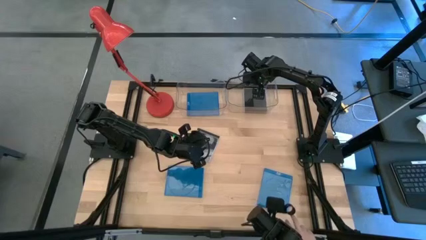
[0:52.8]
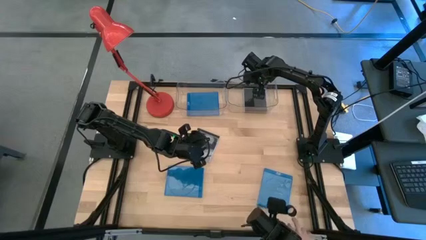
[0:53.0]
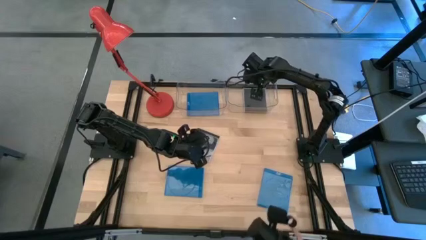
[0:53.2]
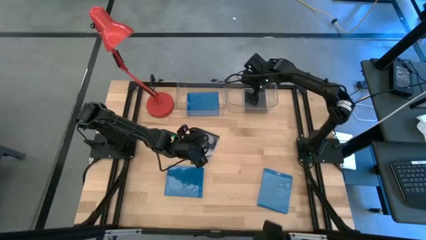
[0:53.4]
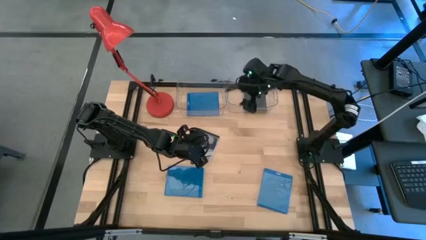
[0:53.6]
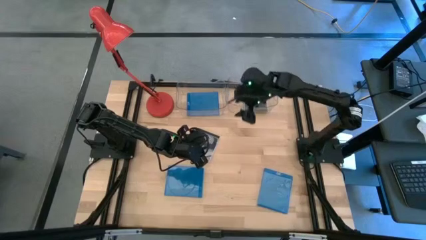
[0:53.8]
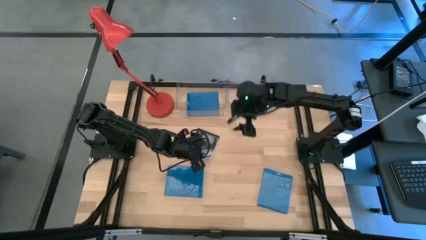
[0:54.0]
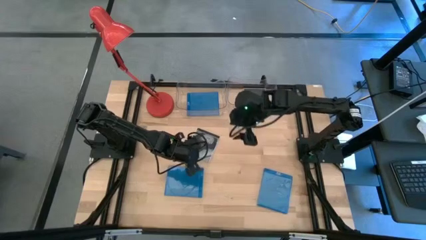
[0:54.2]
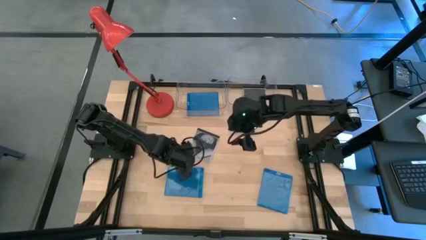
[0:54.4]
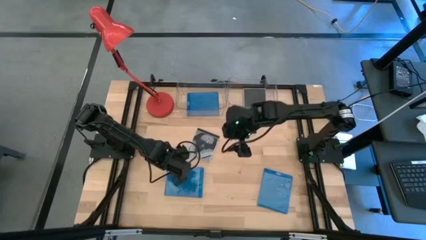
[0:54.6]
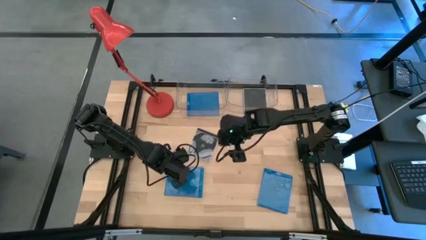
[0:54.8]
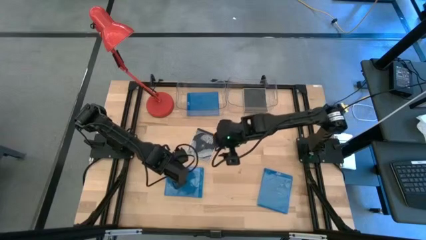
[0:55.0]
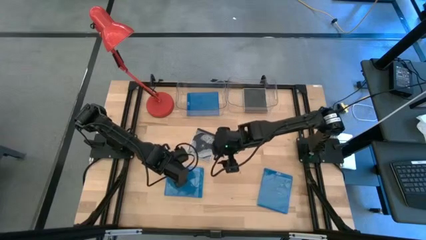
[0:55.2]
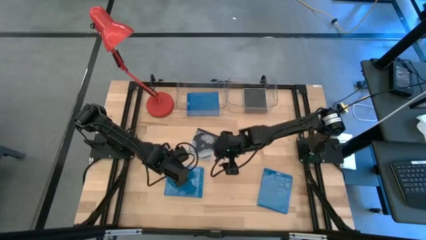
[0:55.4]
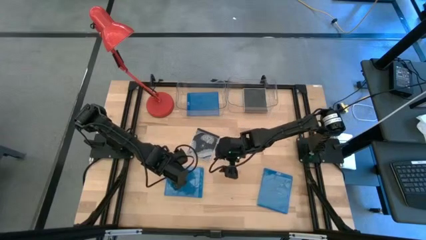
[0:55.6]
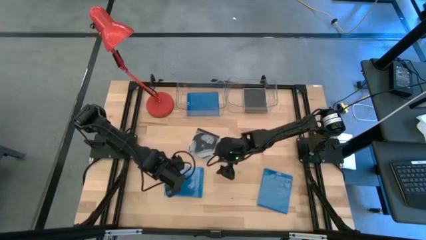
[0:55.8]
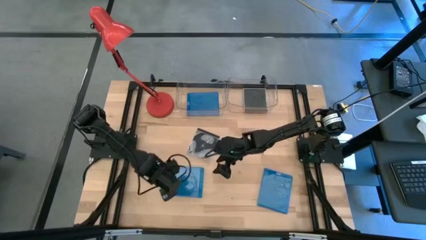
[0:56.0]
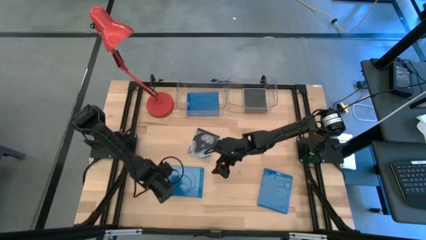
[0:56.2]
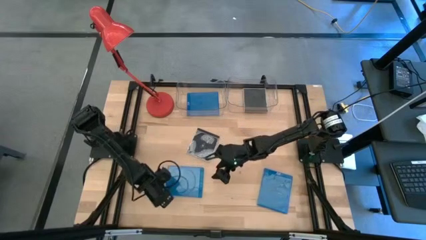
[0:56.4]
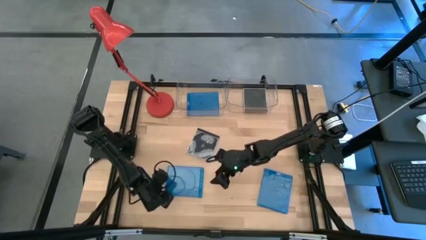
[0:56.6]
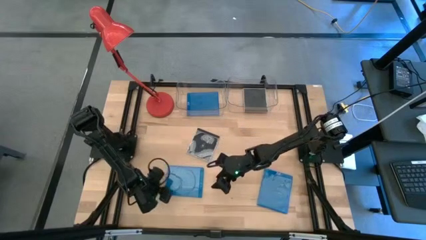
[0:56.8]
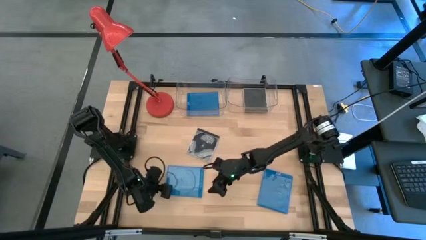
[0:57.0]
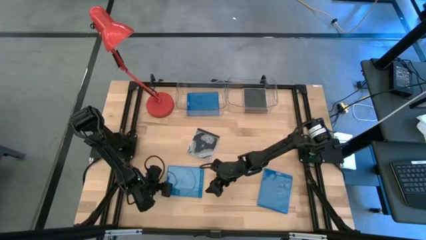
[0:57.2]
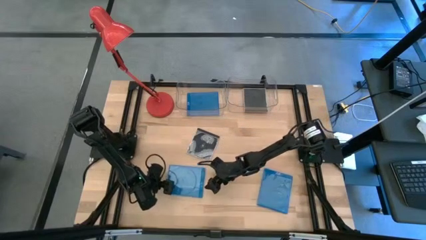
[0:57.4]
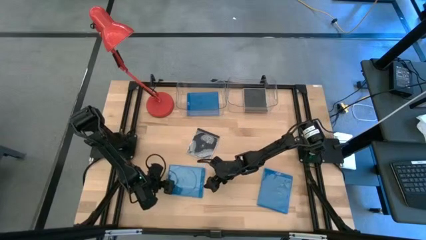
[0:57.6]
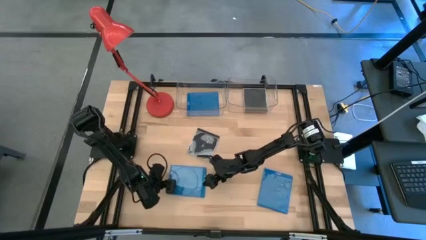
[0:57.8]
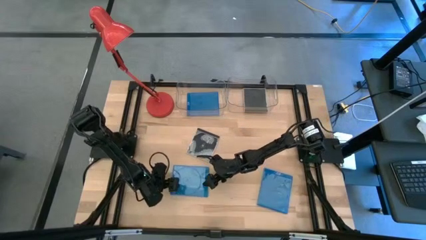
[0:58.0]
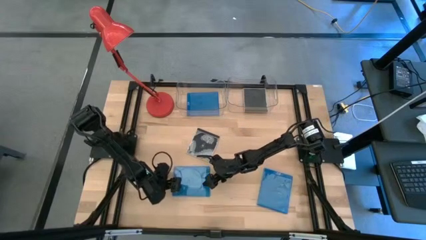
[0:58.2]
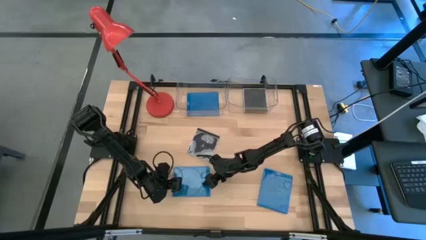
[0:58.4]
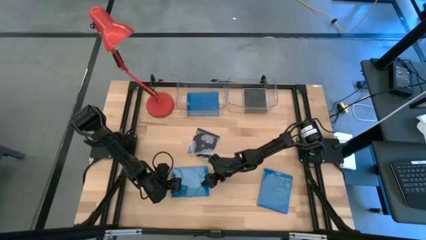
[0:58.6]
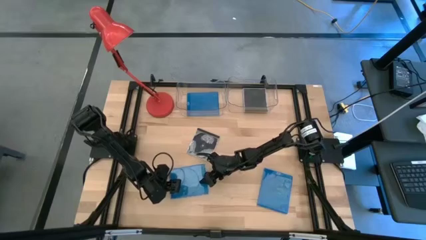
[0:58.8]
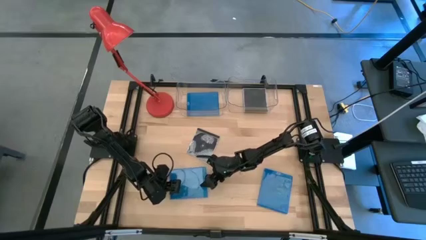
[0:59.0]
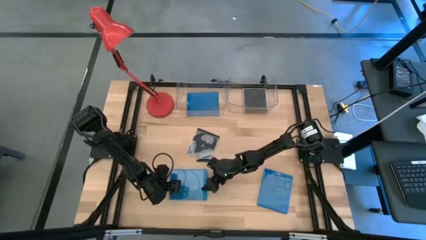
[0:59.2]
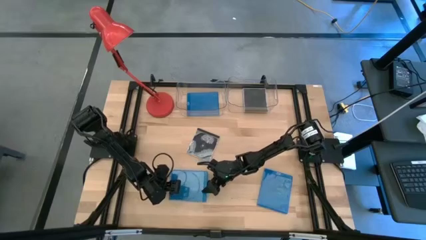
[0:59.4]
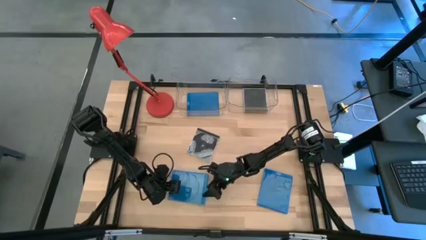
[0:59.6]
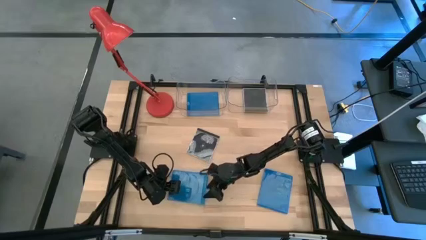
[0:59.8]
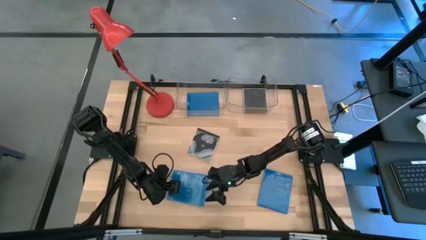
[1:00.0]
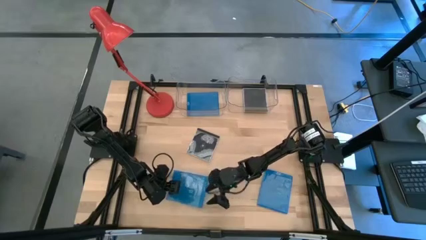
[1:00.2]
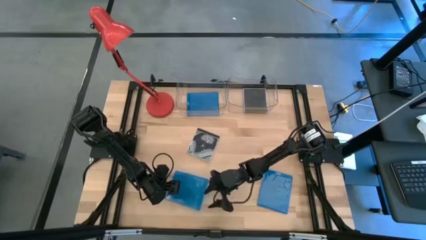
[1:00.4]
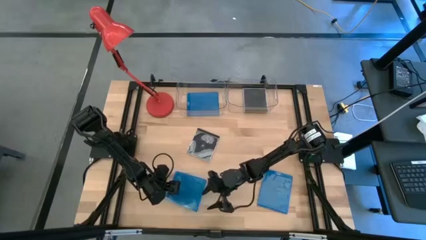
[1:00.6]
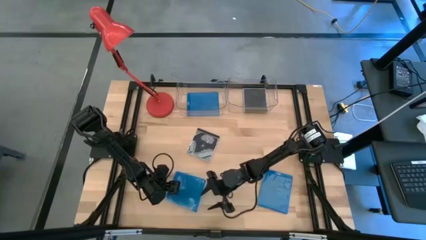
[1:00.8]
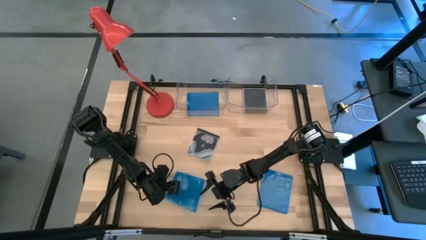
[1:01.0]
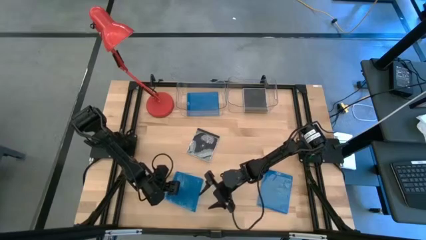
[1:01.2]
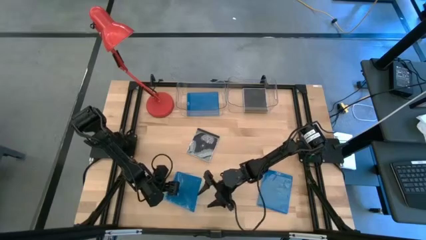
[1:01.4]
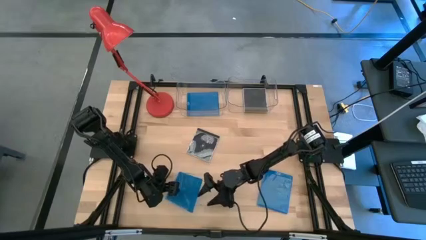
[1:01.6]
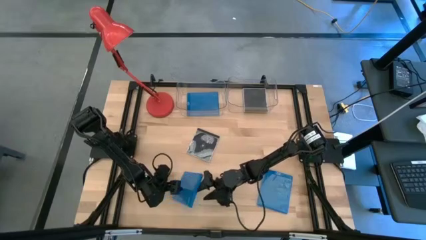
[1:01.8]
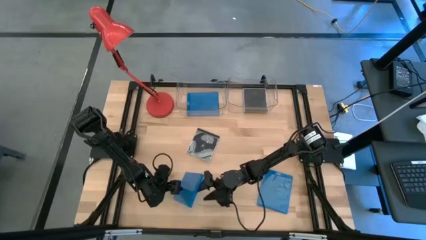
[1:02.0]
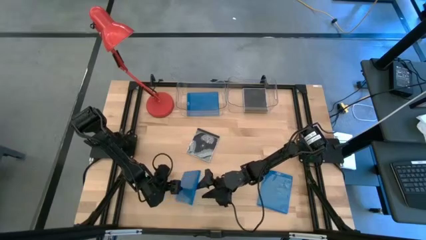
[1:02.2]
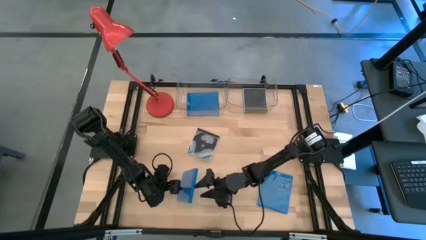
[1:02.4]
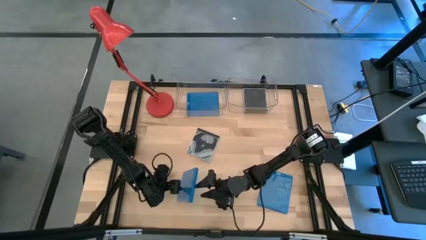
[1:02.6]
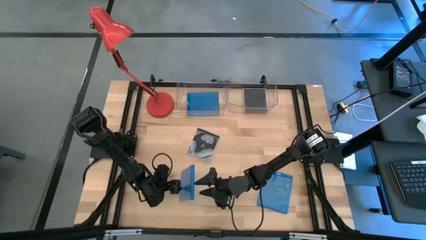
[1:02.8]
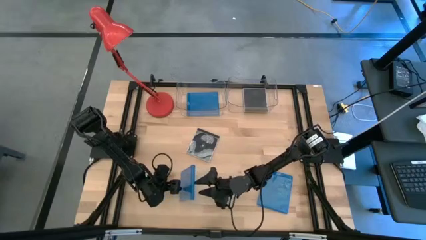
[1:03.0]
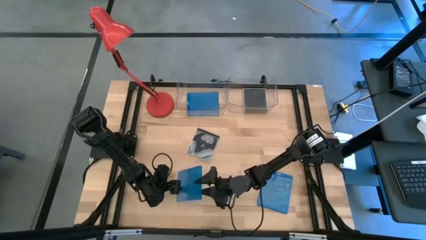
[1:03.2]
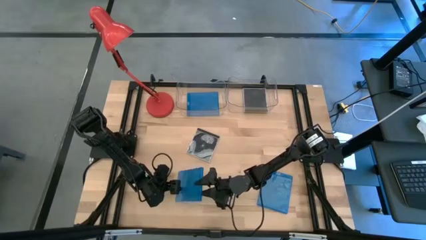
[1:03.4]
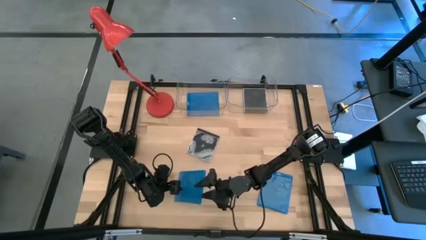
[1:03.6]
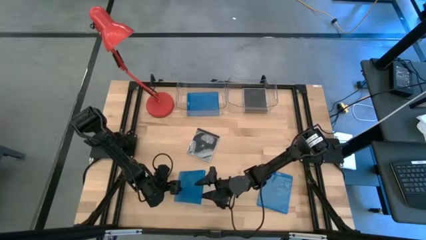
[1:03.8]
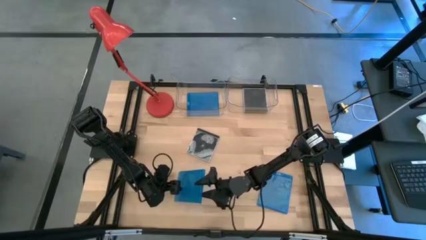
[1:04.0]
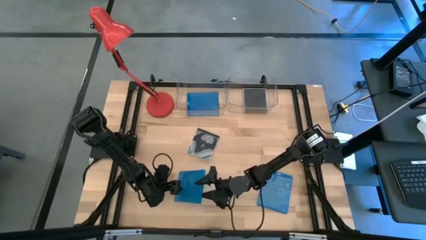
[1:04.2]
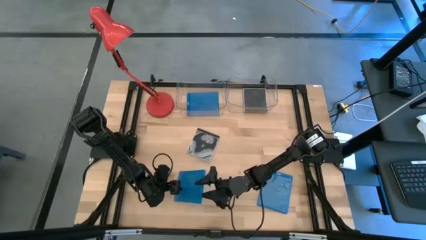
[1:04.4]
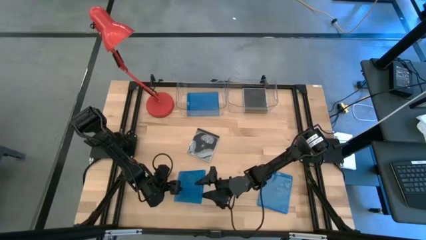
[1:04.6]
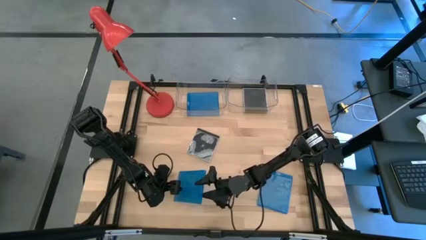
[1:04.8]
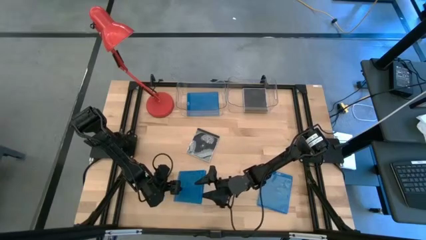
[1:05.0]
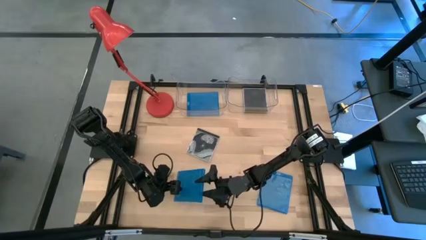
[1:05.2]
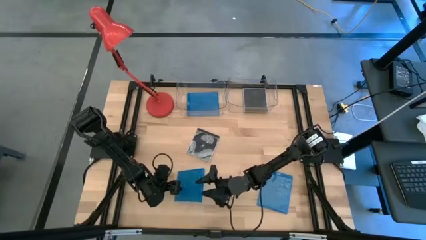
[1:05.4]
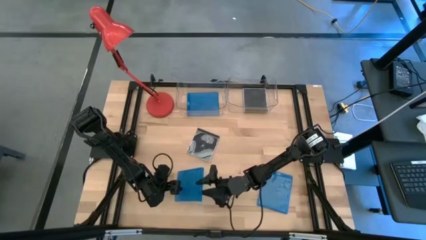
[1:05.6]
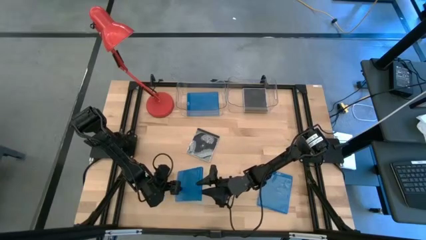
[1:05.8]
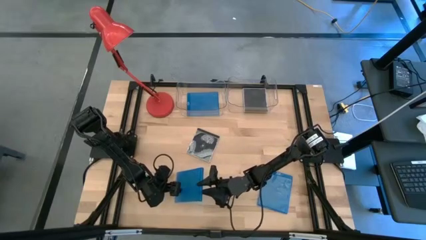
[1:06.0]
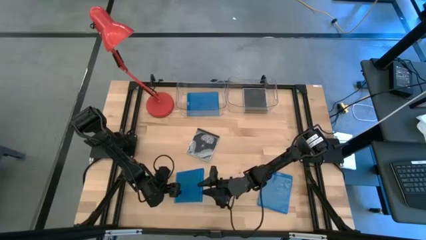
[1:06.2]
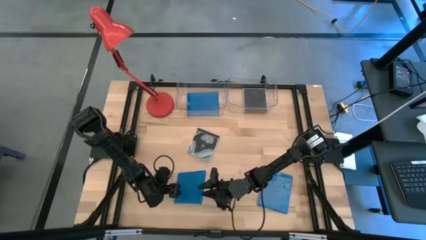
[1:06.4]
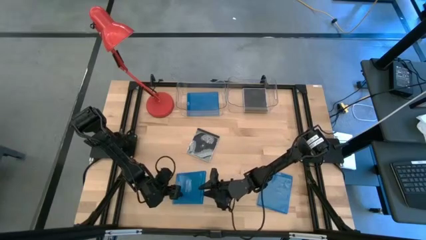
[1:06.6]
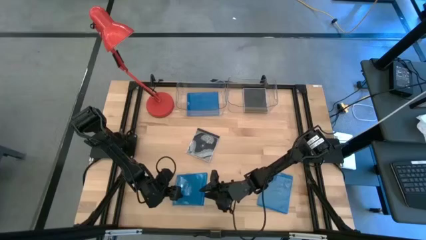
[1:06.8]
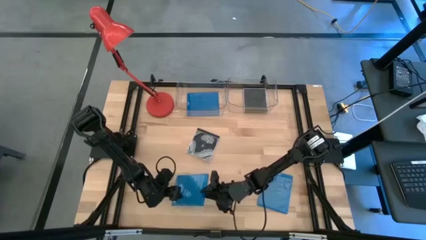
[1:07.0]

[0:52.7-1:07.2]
Task: Pick & place jewel cases by type
Put the left blue cd case into the left transparent bin

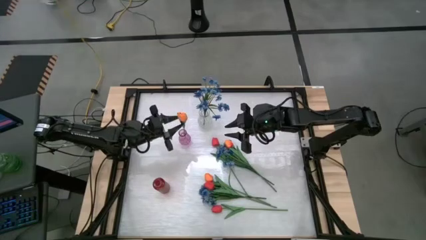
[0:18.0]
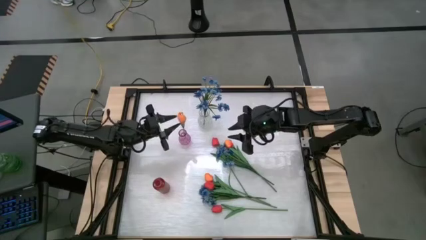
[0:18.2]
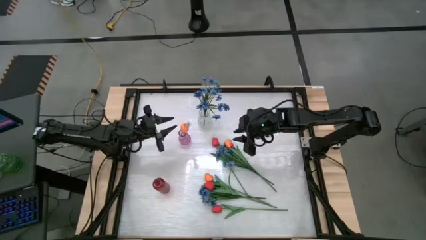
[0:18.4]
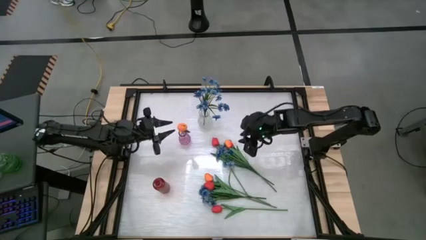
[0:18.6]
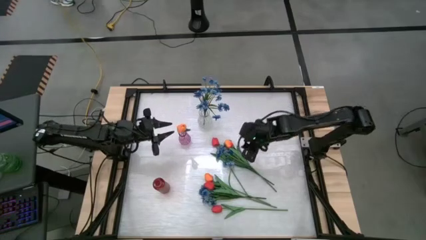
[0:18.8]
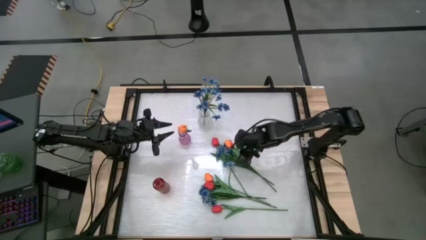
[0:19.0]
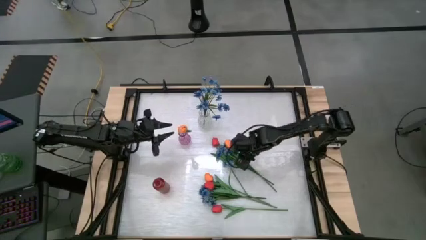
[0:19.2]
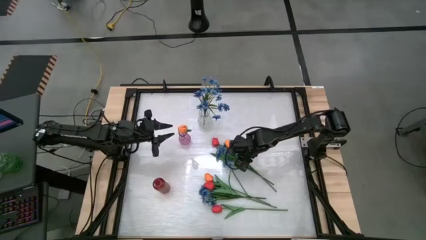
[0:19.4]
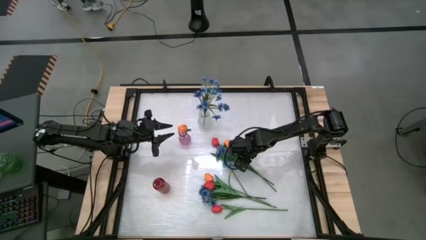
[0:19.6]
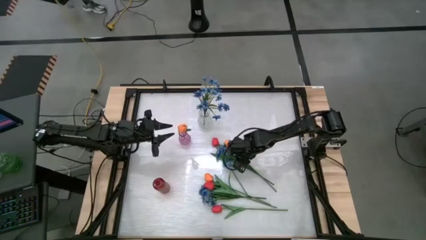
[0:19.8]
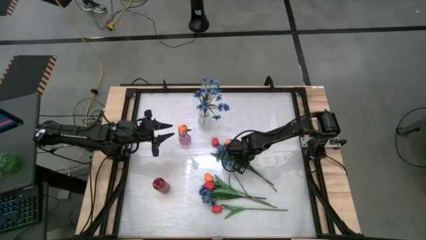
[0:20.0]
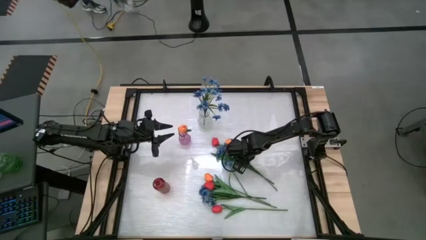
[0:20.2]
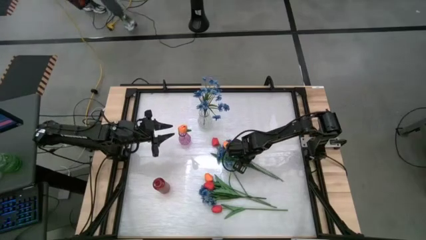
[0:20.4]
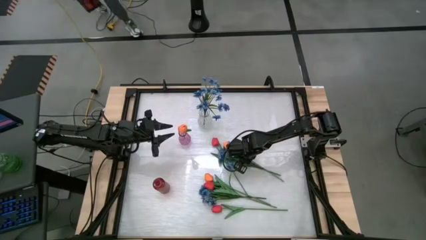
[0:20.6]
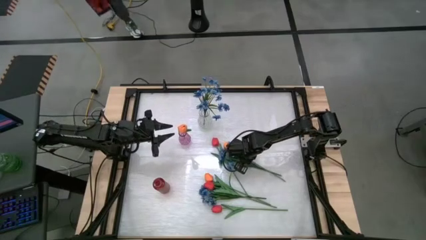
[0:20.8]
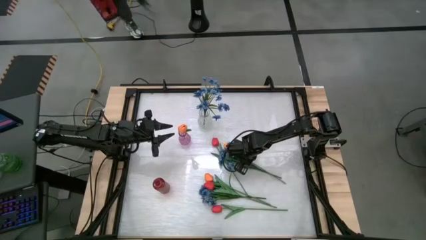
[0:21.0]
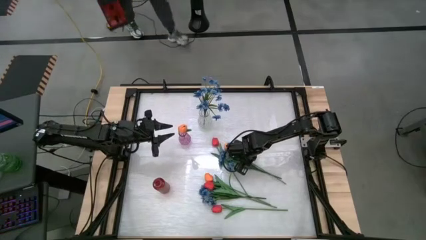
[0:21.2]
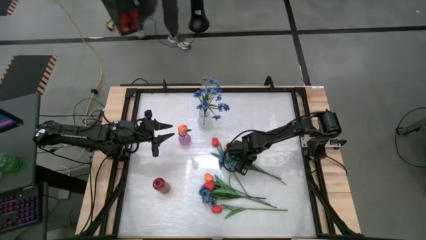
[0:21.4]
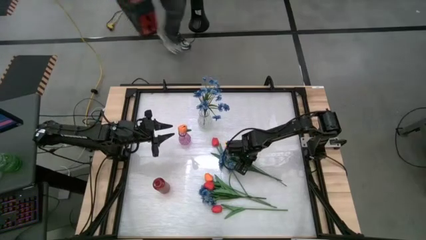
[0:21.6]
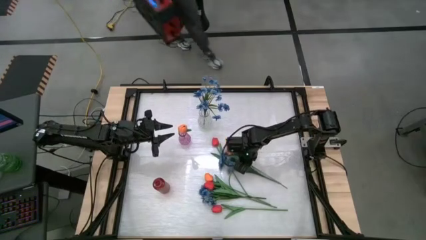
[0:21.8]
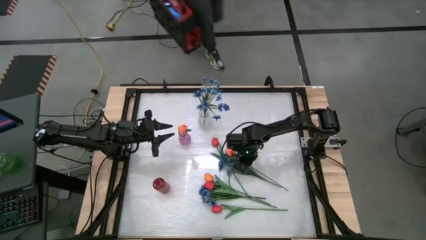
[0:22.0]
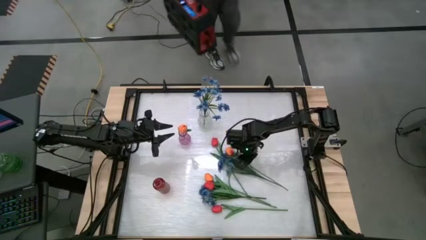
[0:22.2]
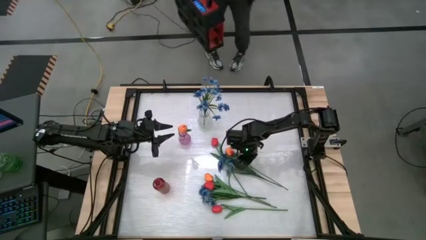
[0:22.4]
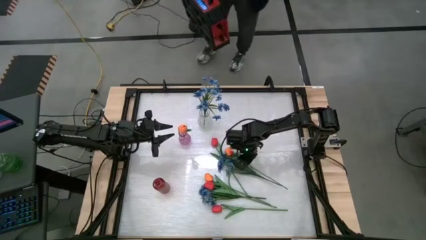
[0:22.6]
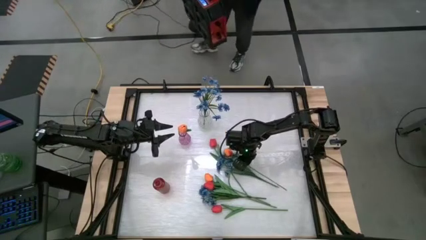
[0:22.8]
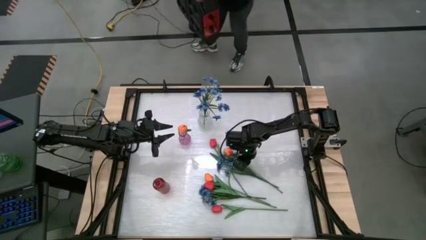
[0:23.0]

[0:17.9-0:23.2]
Task: Sort flowers into vase by color
Put the top orange tulip into the purple vase
